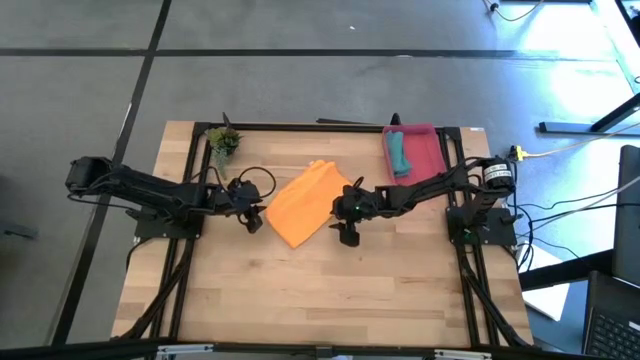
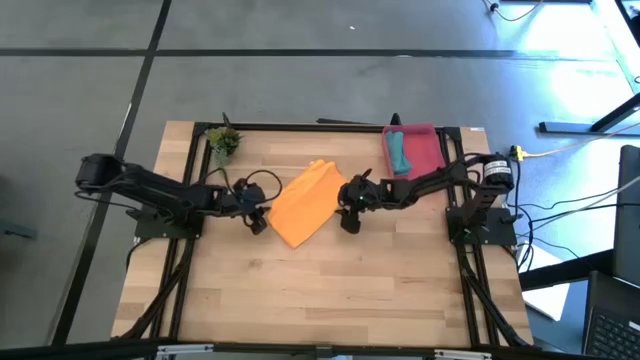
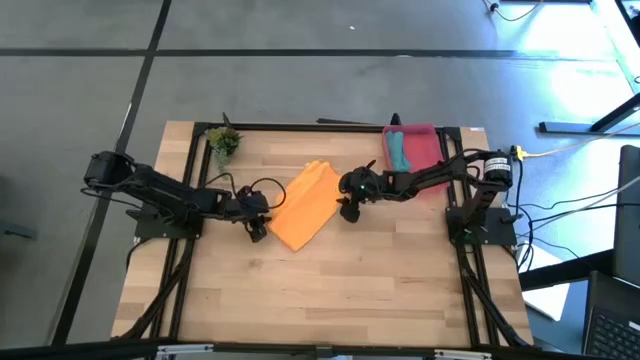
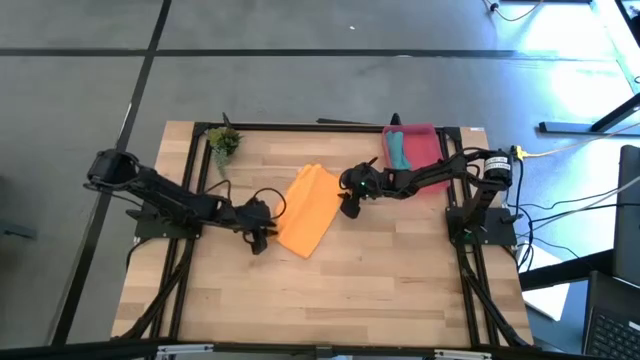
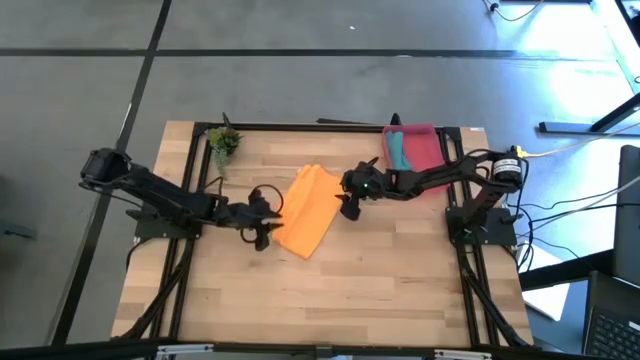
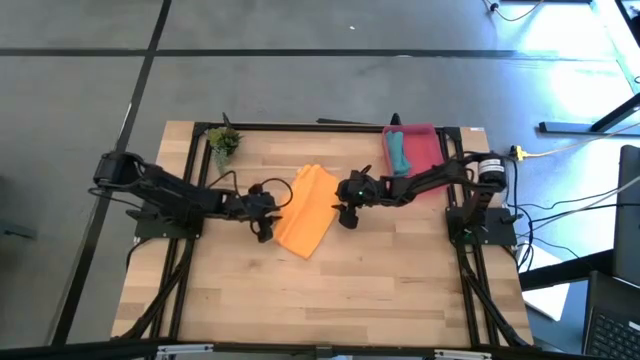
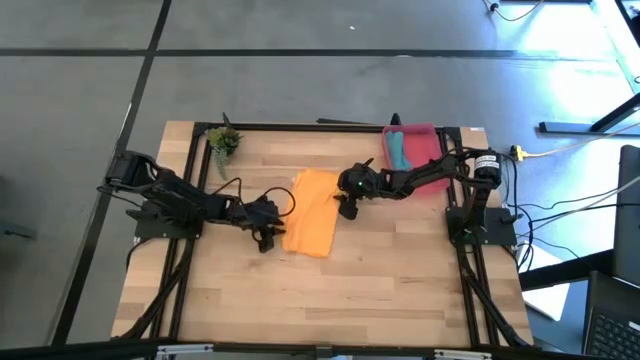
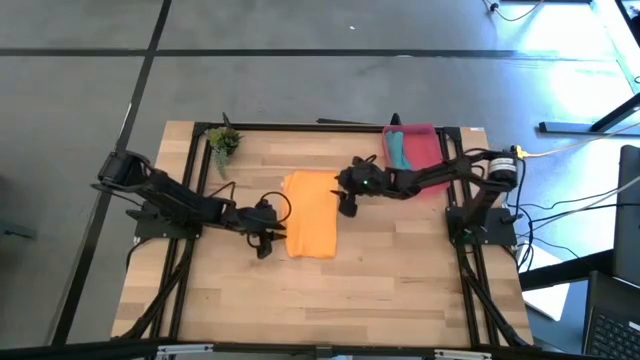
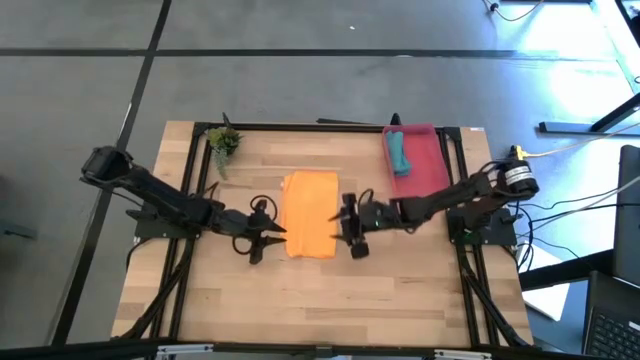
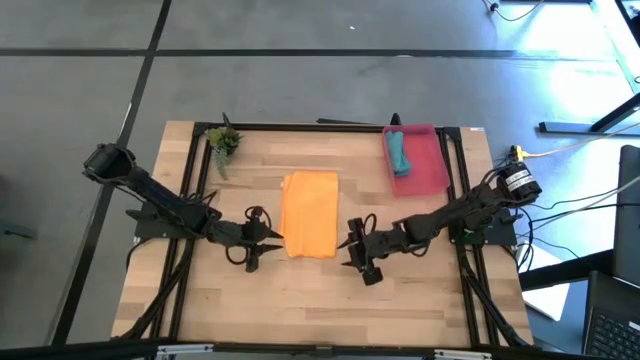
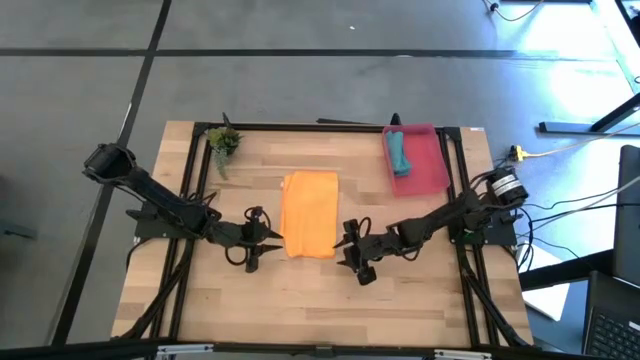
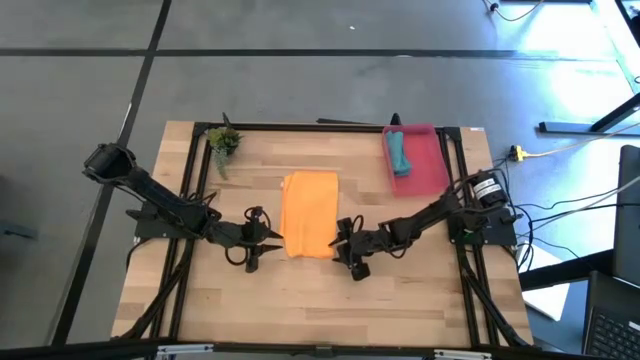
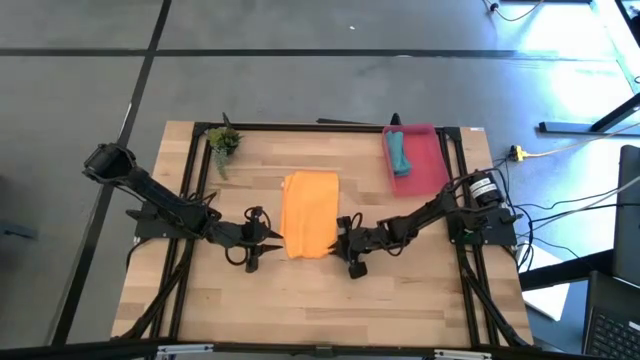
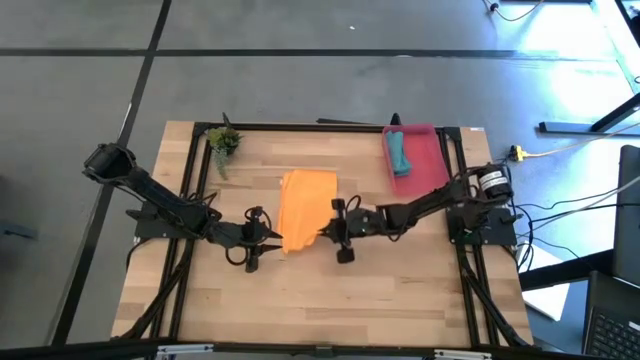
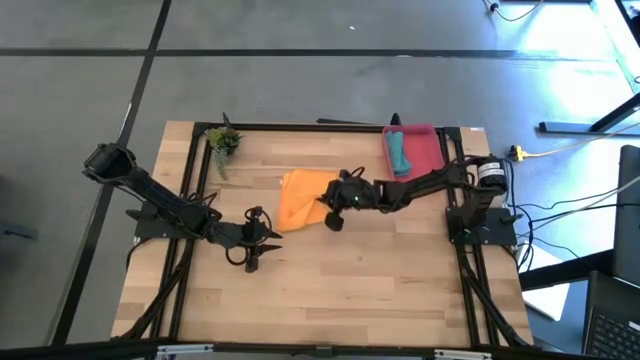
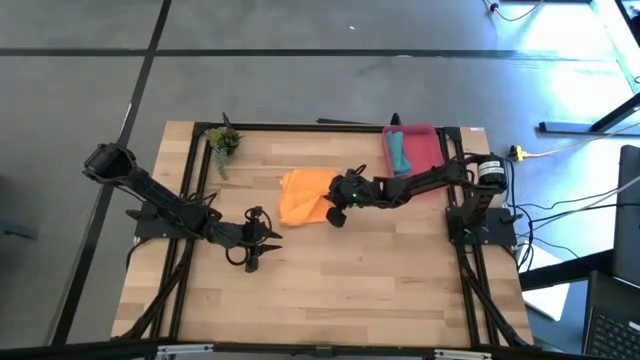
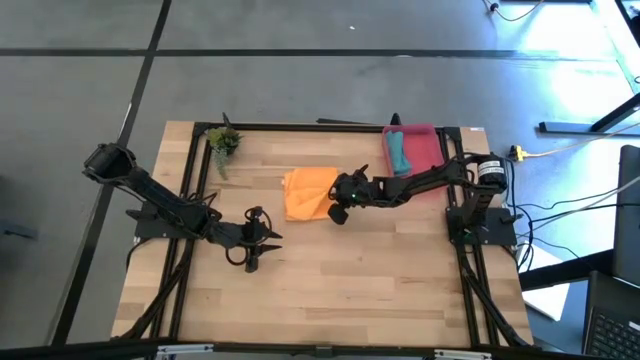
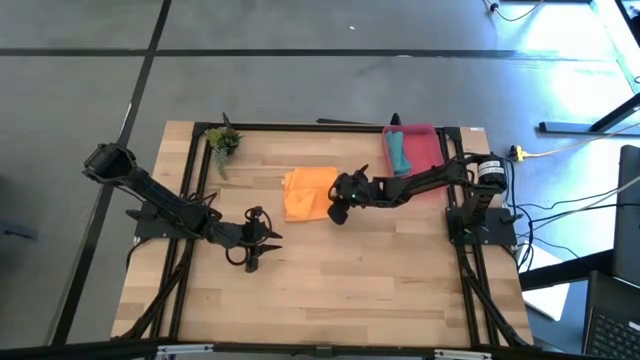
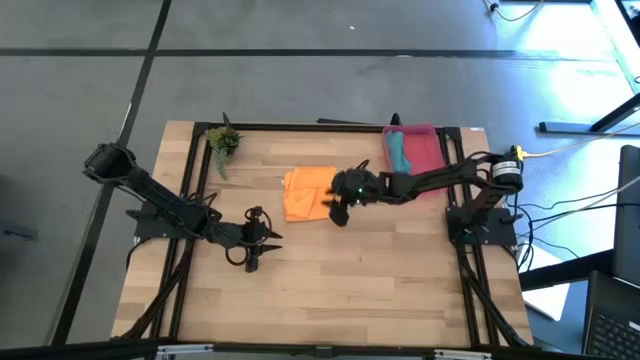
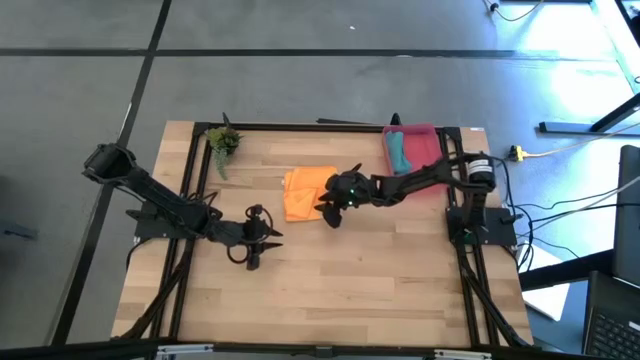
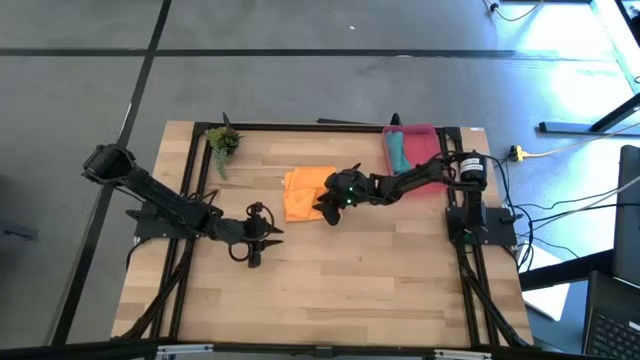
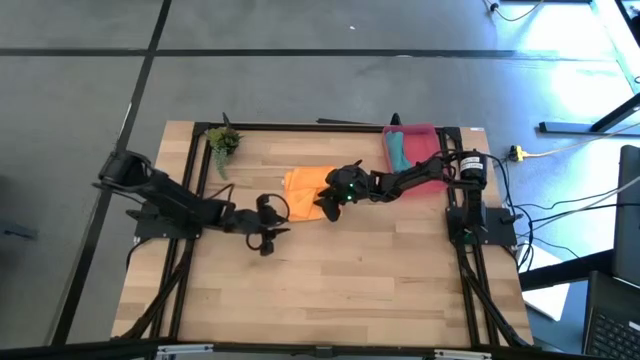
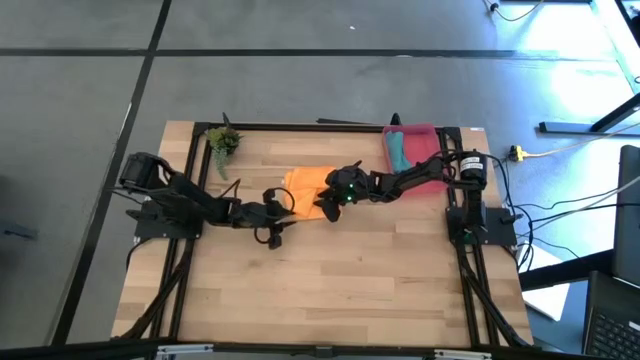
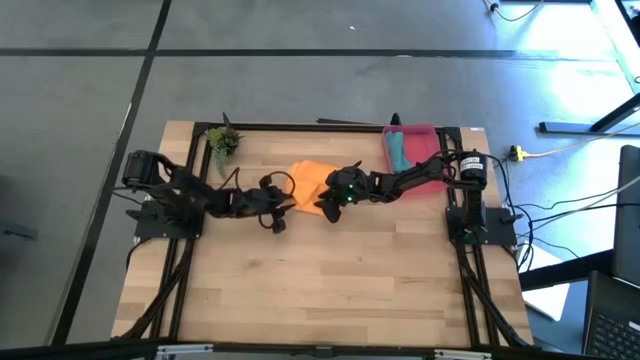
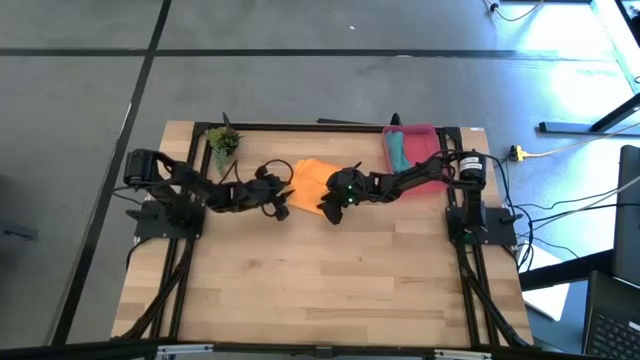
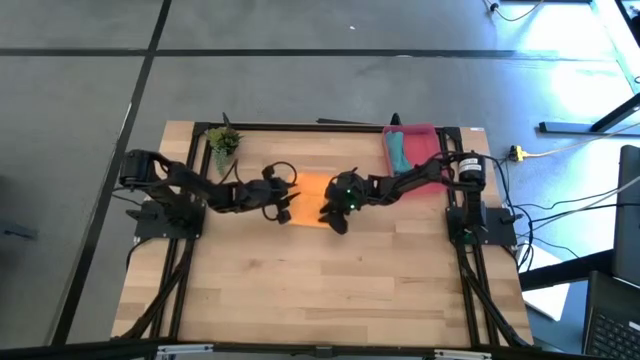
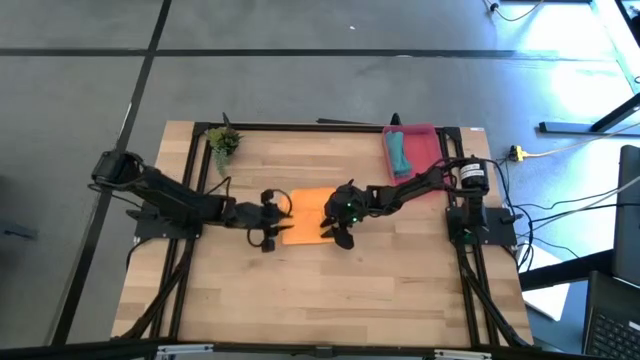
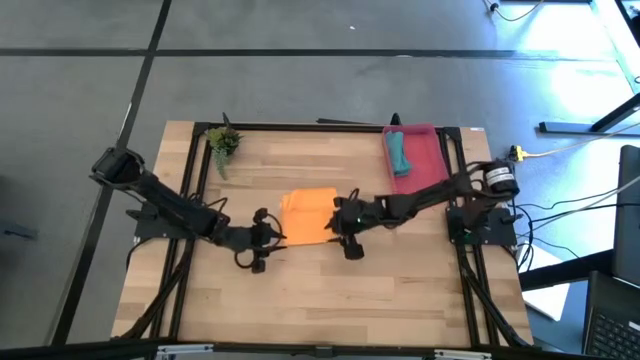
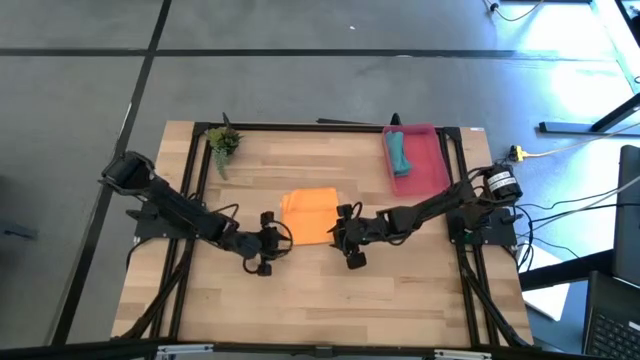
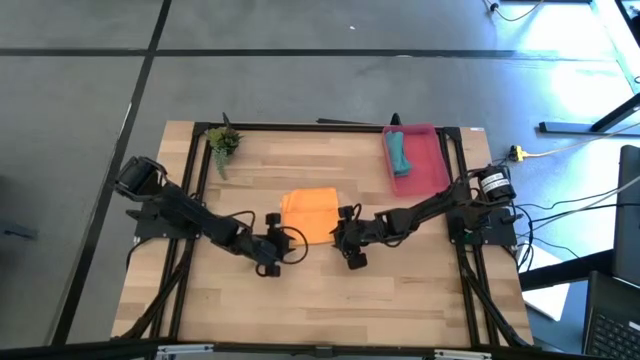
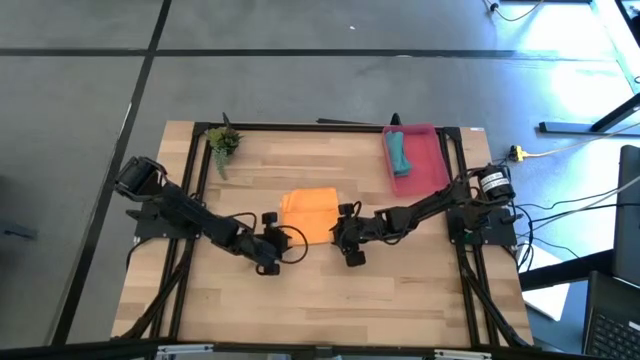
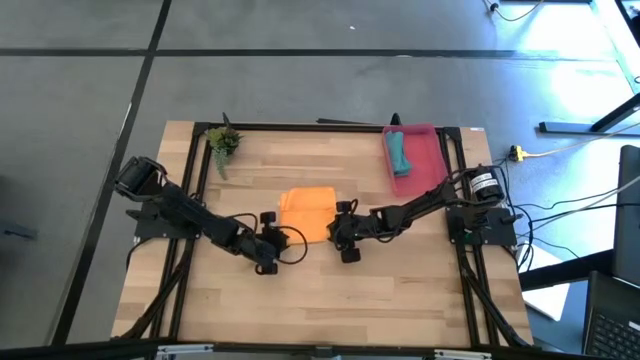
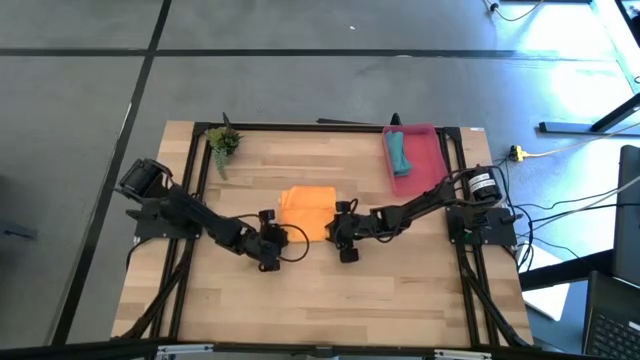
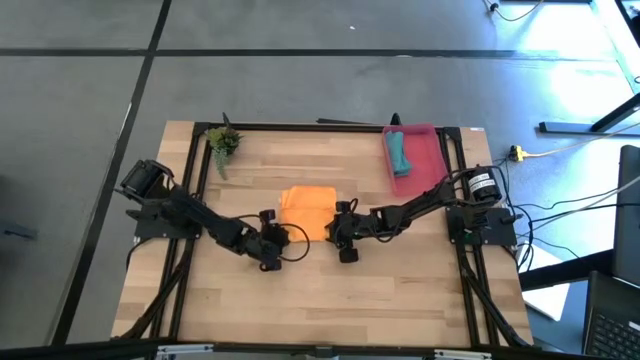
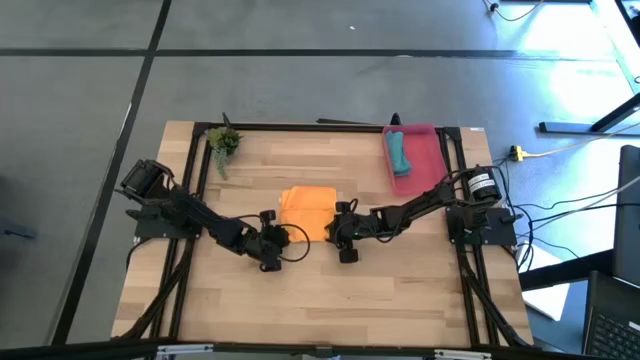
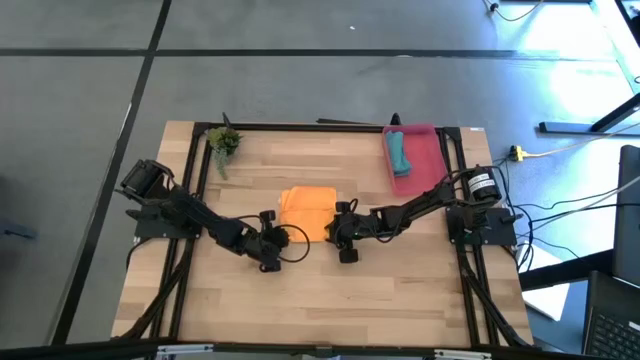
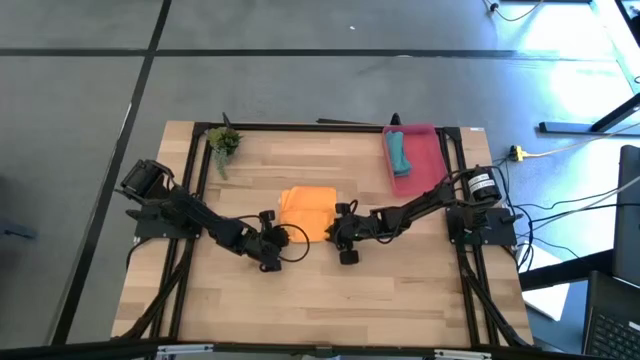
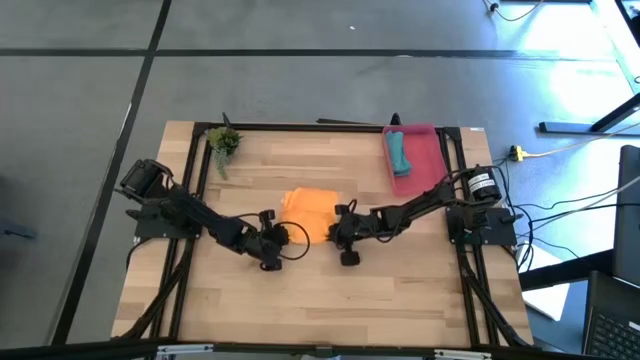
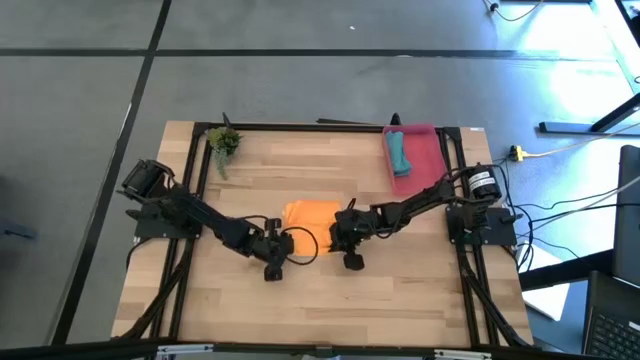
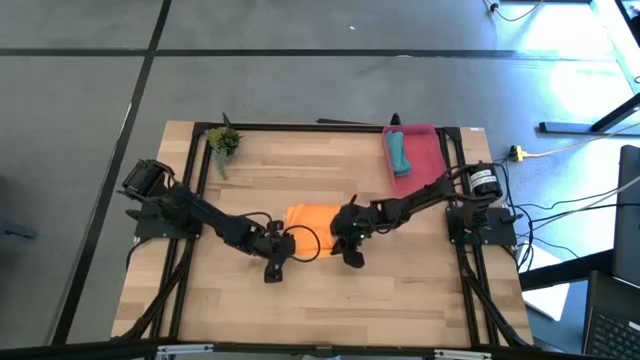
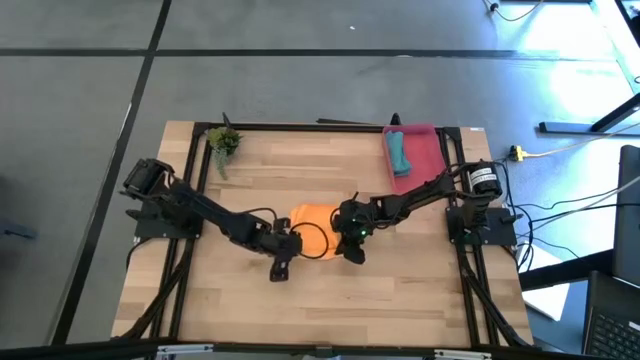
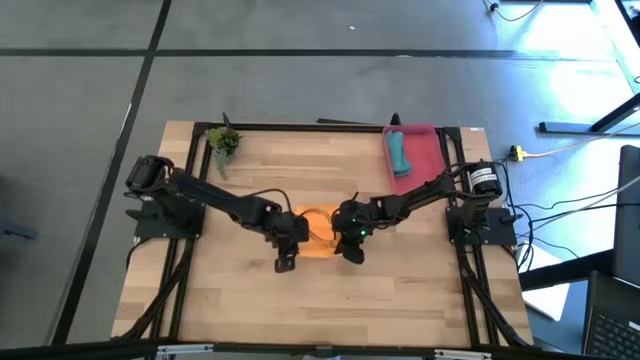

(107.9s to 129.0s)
Task: Roll microfiber towels into tight, uniform cylinder then place into a basket
Roll the yellow microfiber cloth on the table

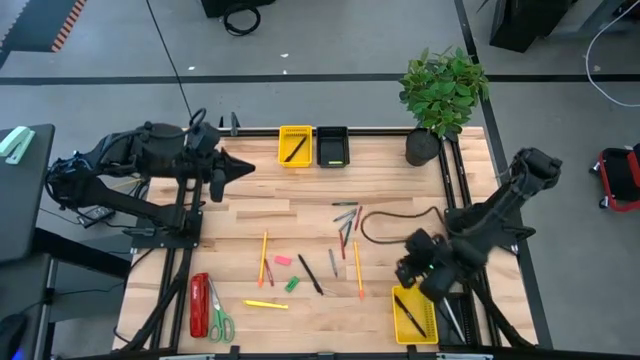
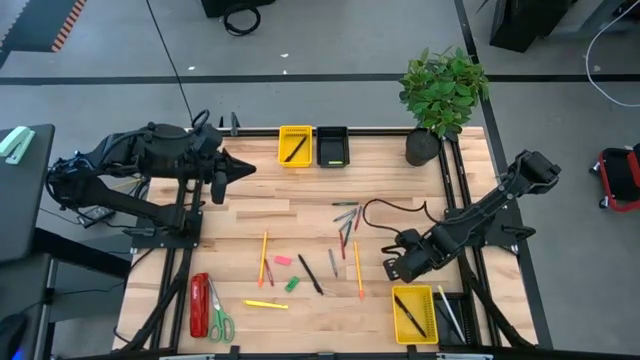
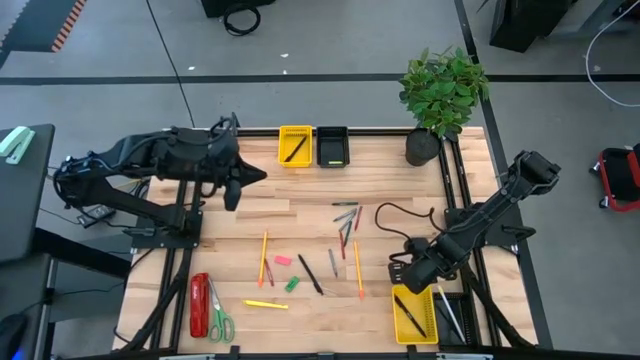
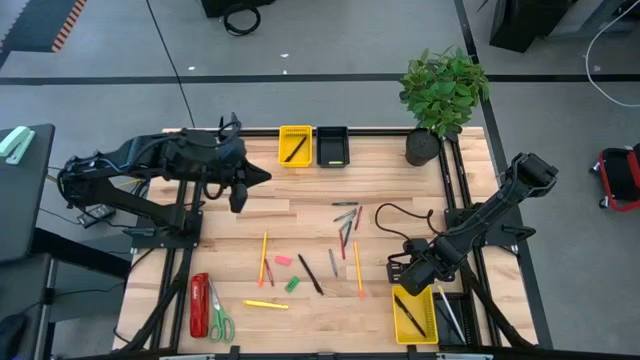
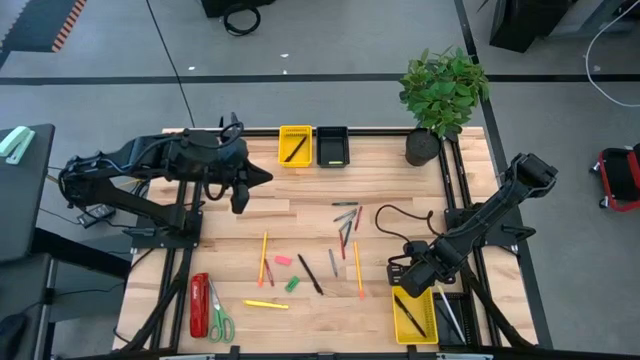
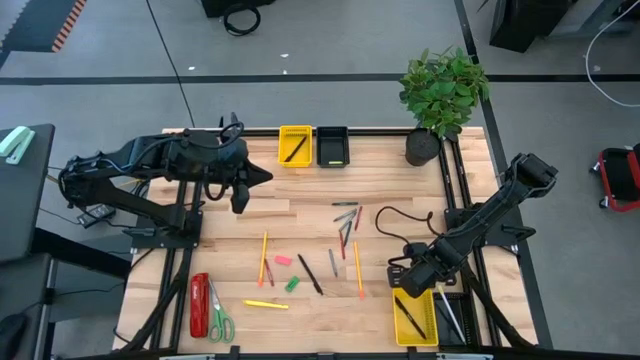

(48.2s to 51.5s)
Task: Sort crayons/erasers/pens/pencils in bins
Adjust the bottom yellow bin
